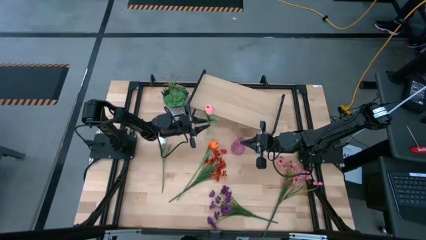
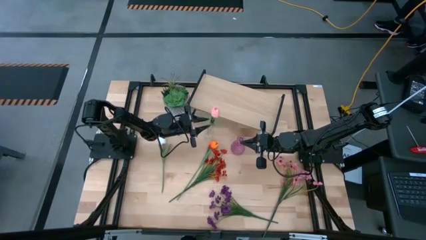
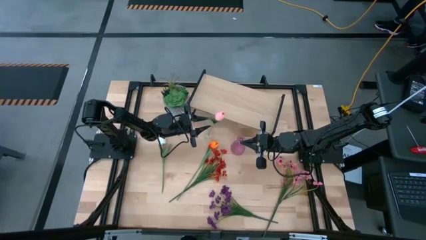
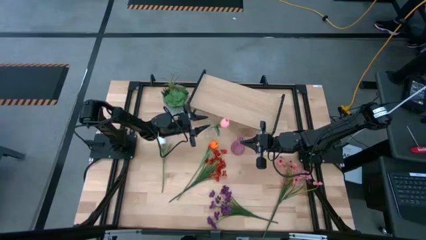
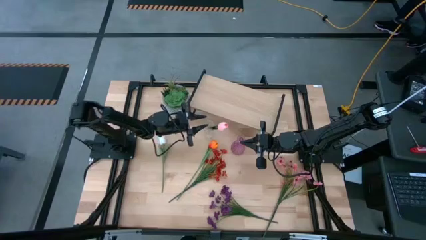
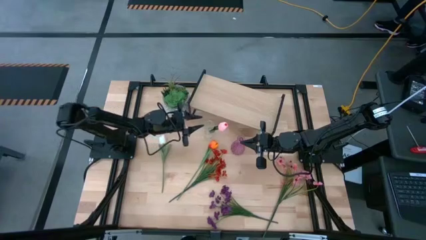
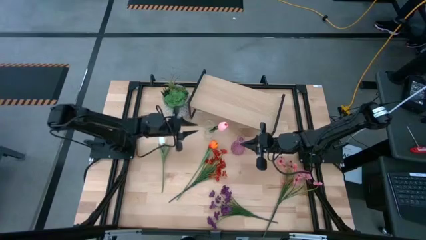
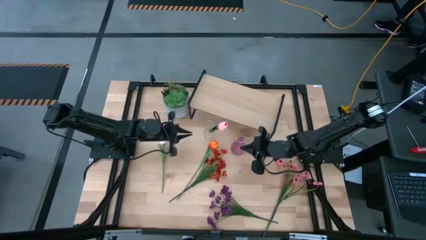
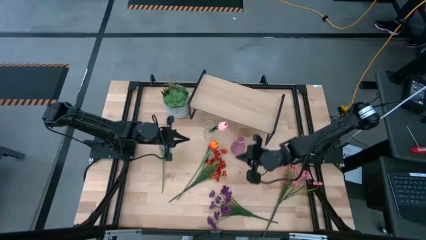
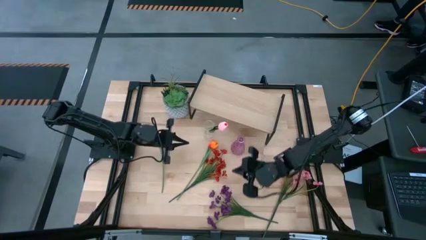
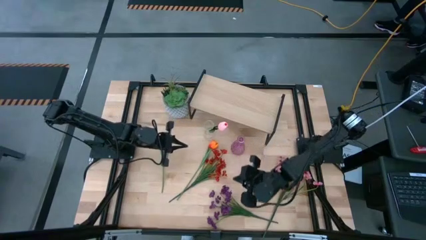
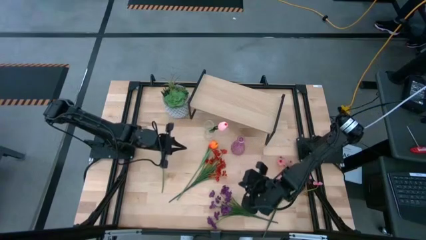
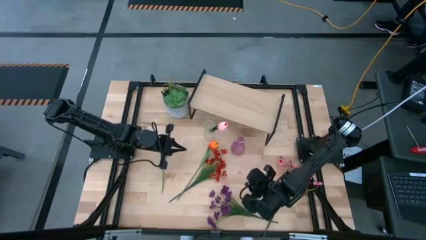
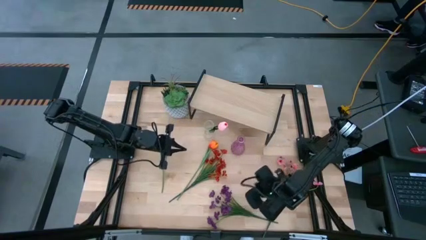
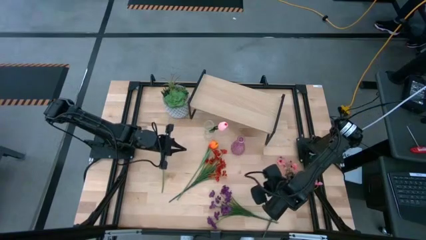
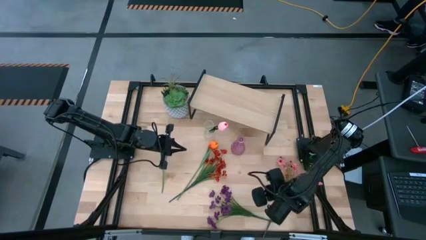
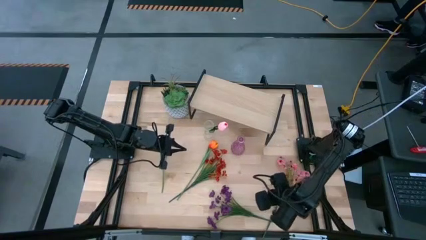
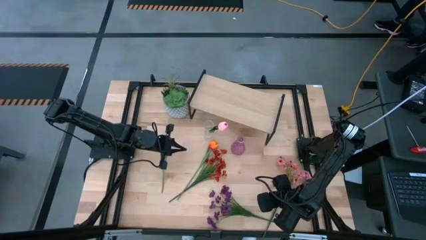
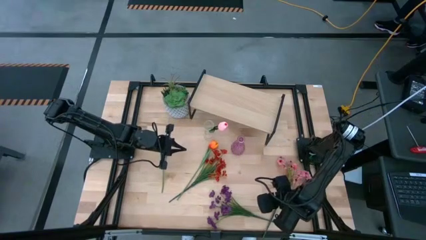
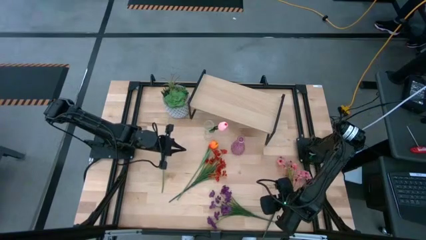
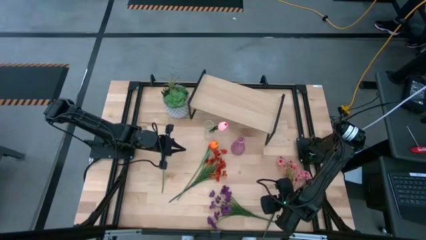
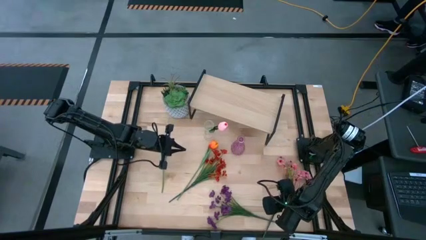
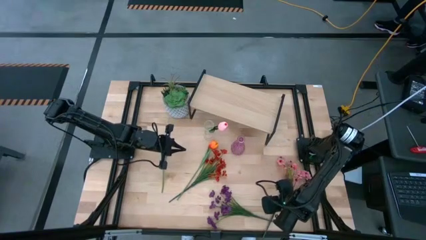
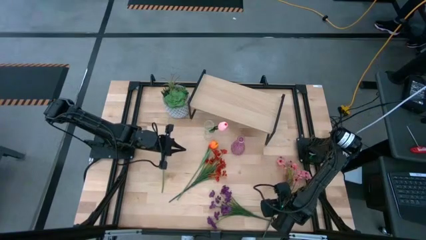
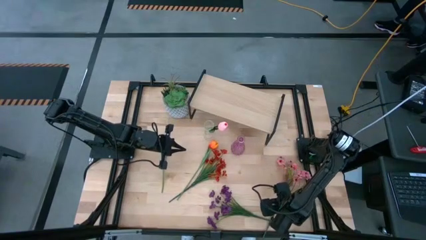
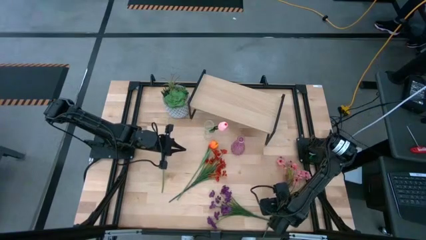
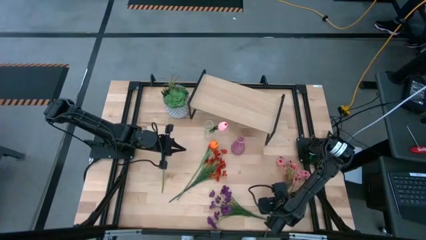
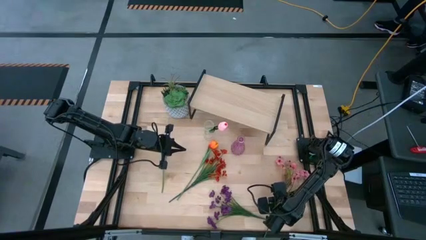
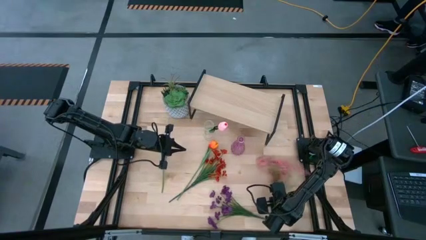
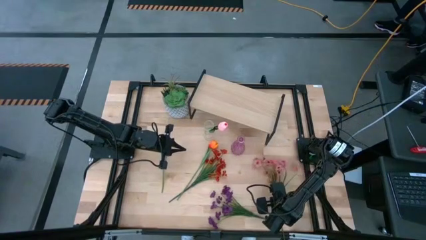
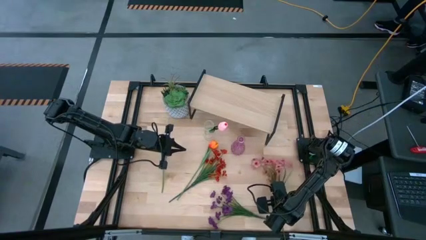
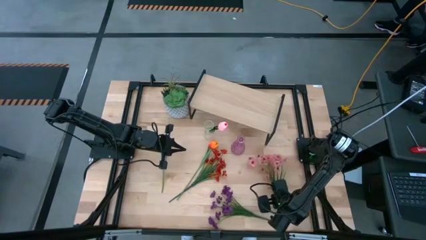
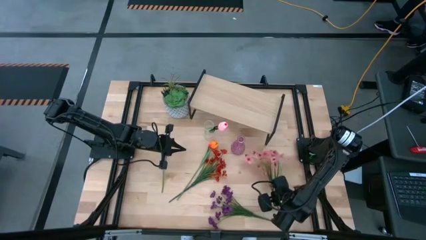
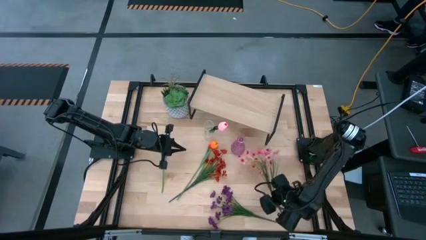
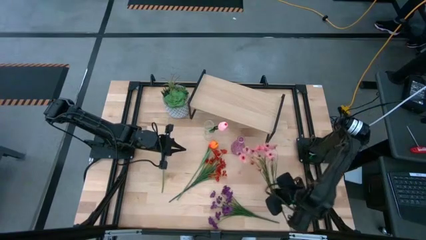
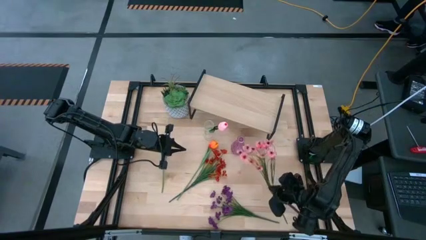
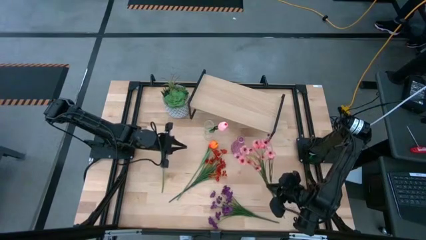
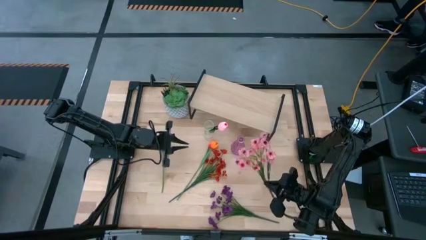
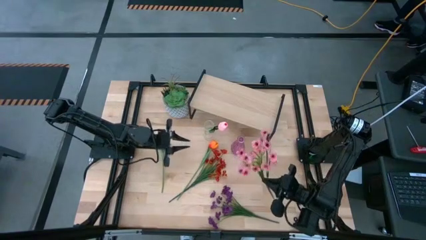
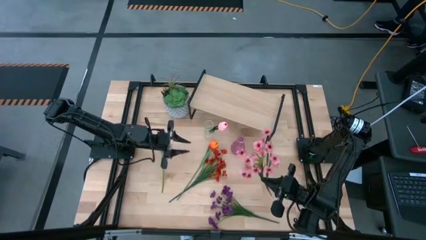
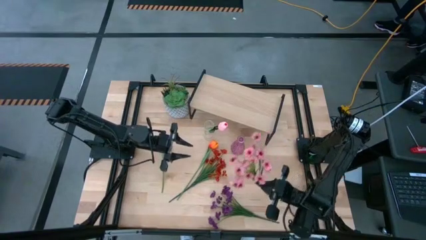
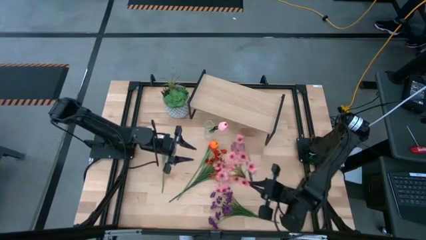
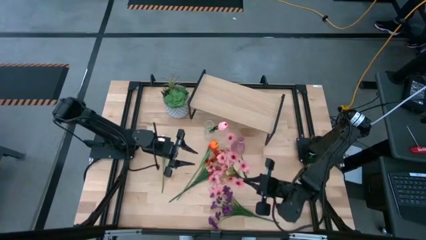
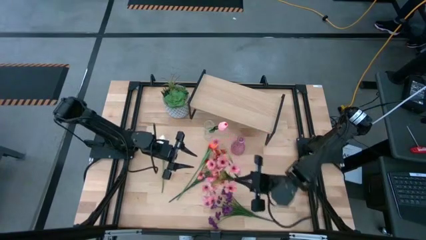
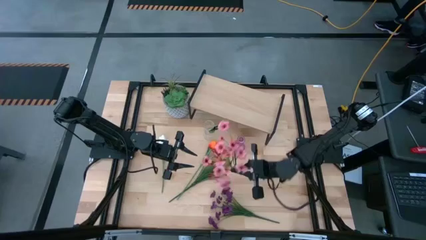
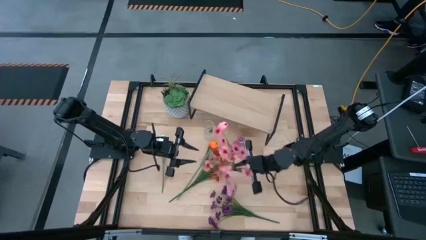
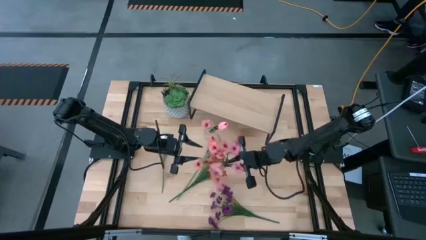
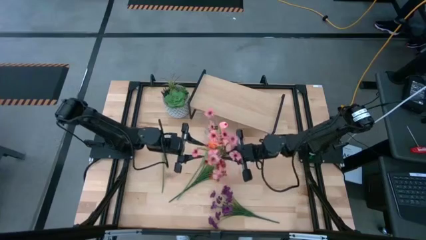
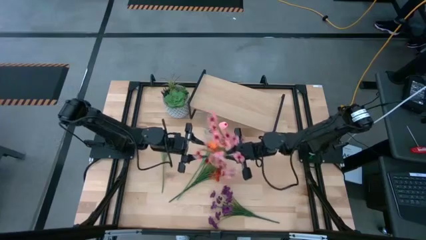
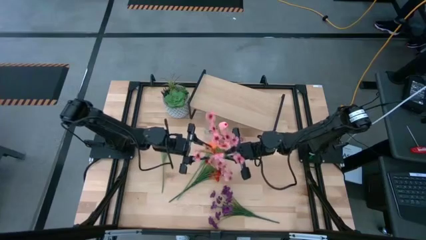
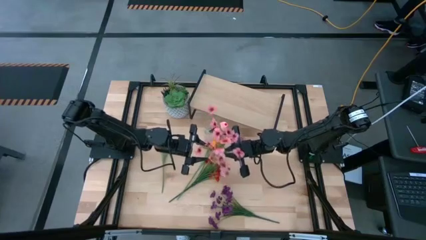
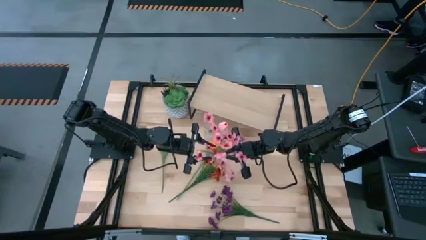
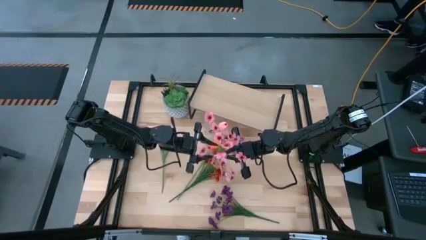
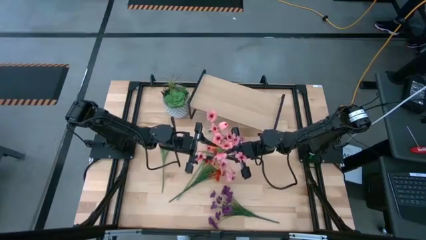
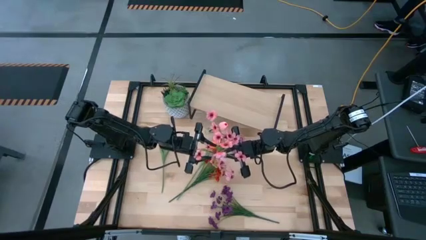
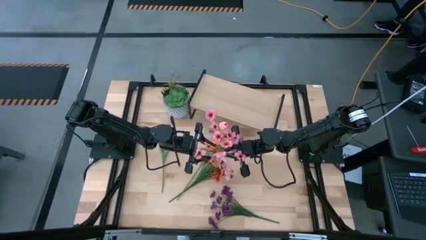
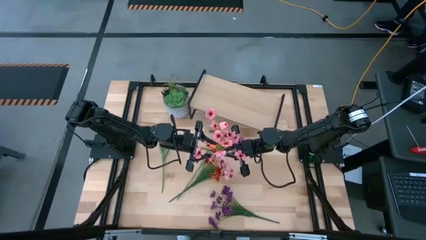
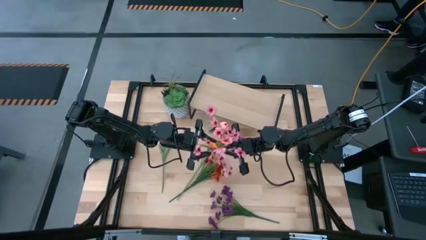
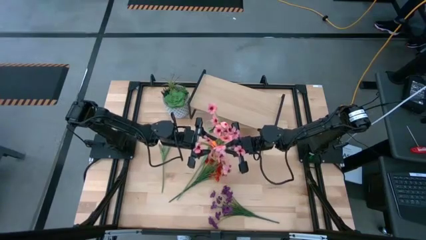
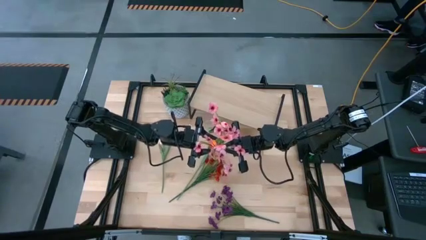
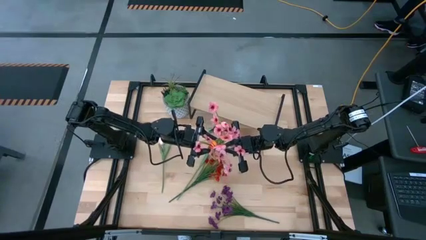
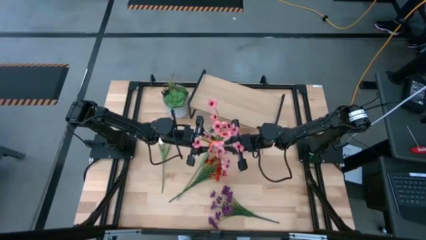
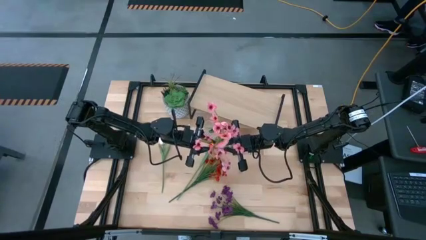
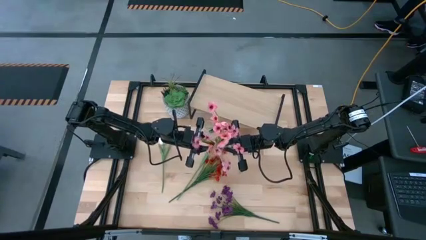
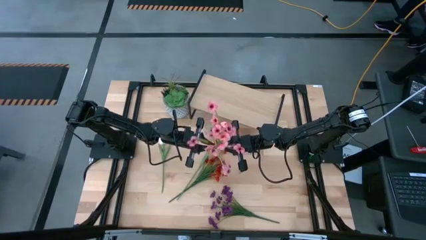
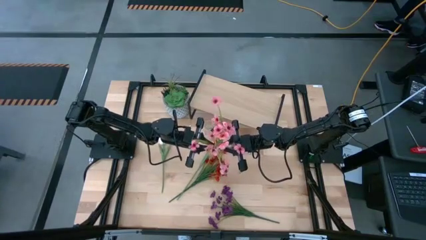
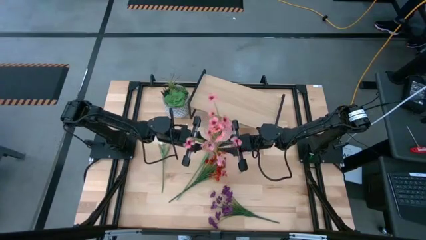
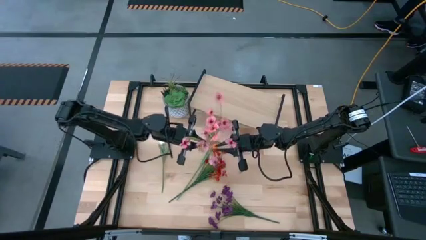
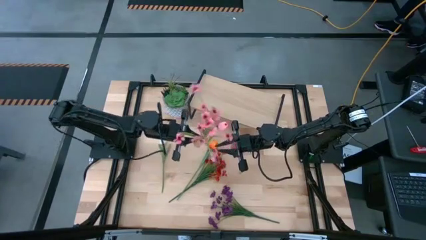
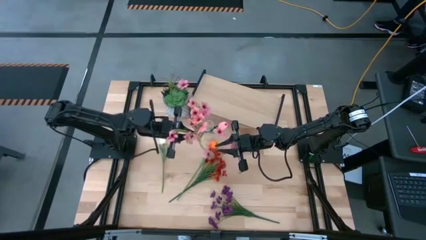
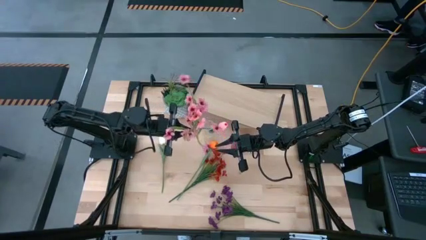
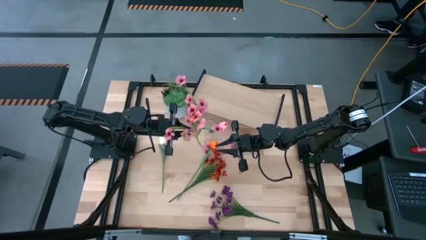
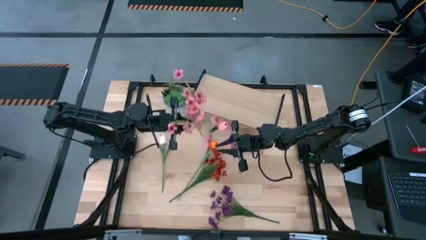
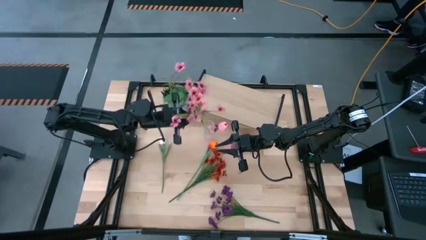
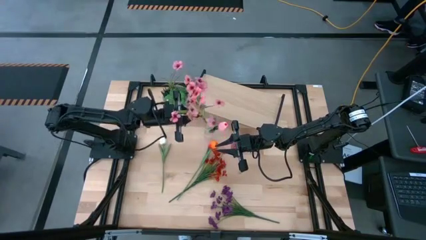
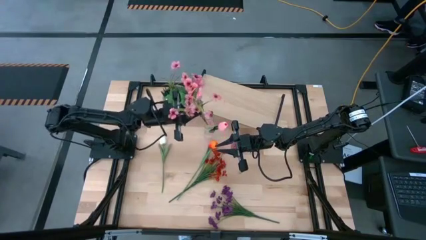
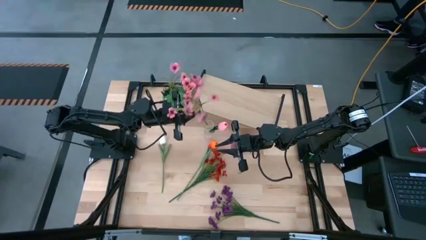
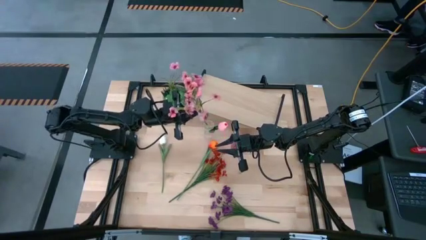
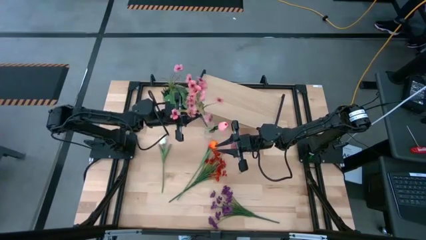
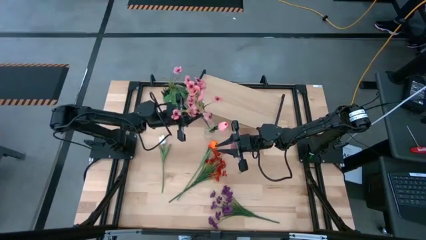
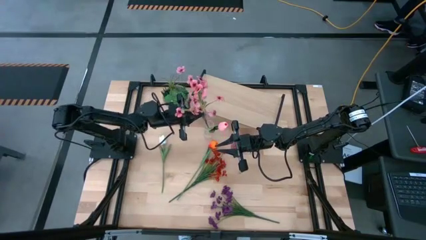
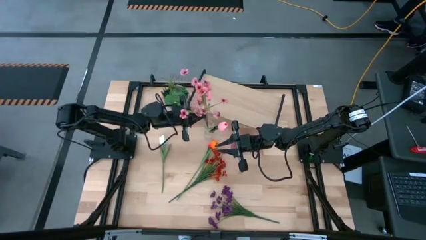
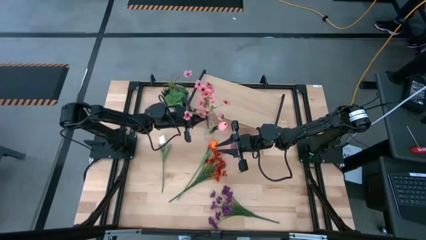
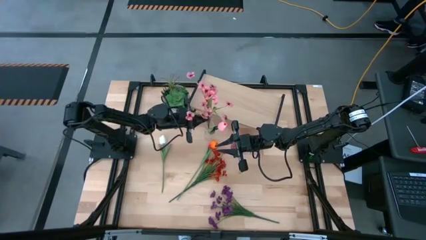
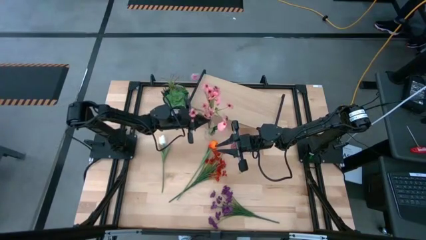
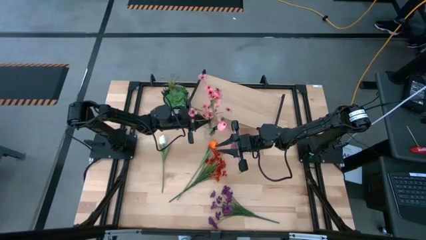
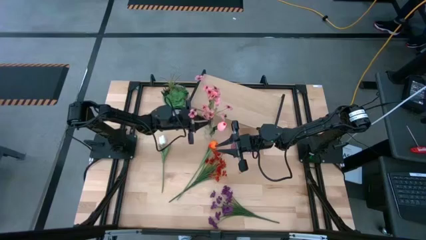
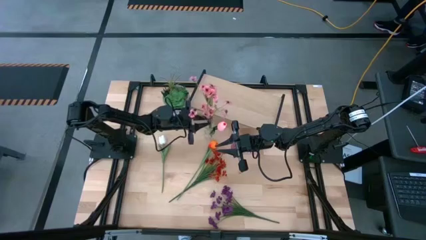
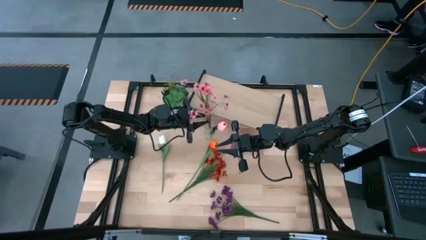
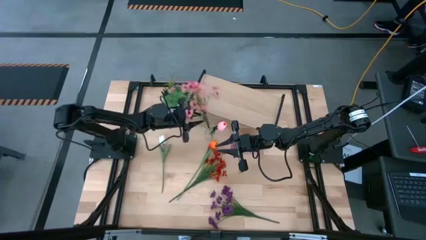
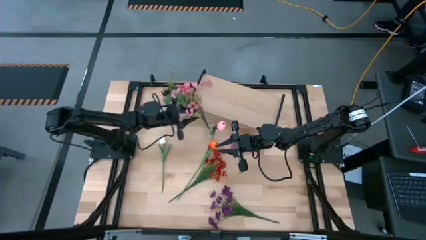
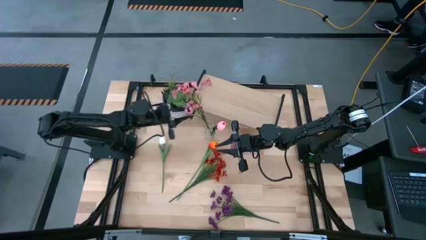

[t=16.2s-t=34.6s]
Task: Pick and place flowers into a vace then onto a shelf
Put the pink flowers into the transparent vase
